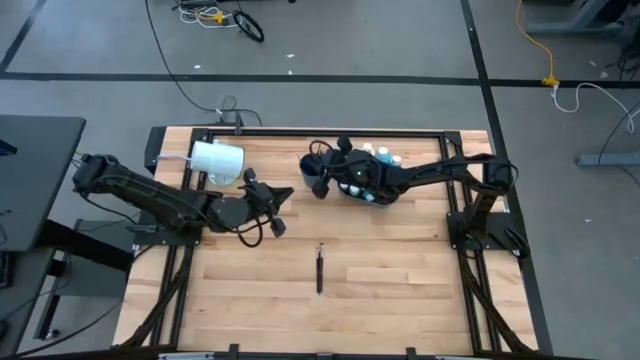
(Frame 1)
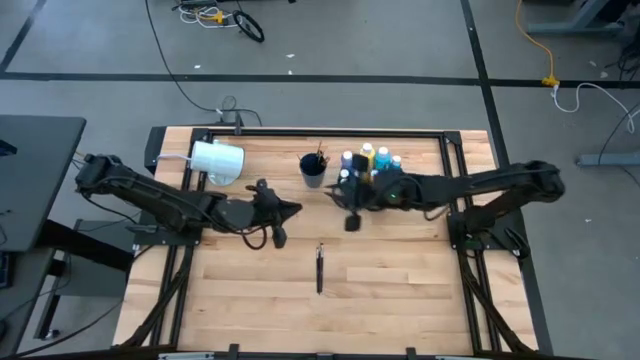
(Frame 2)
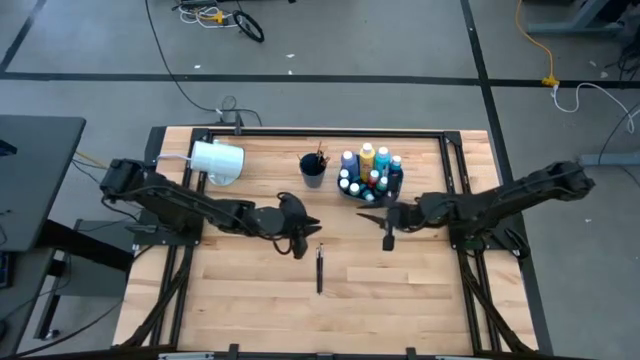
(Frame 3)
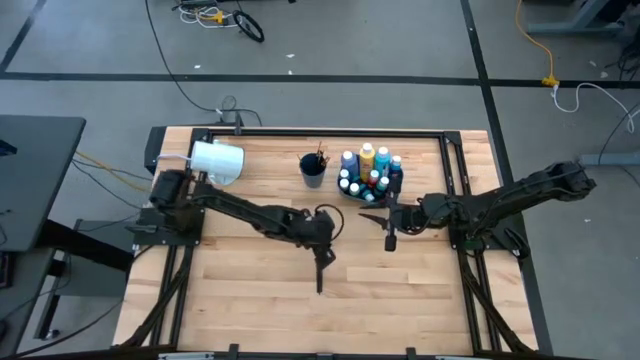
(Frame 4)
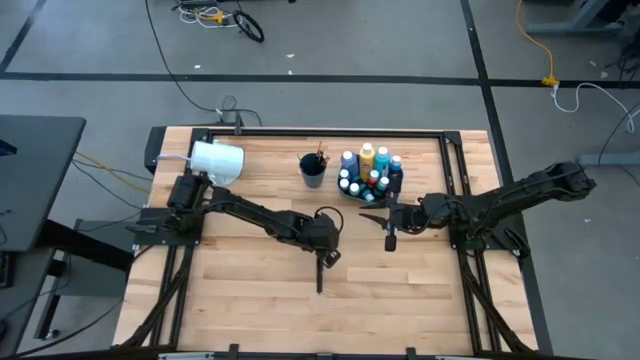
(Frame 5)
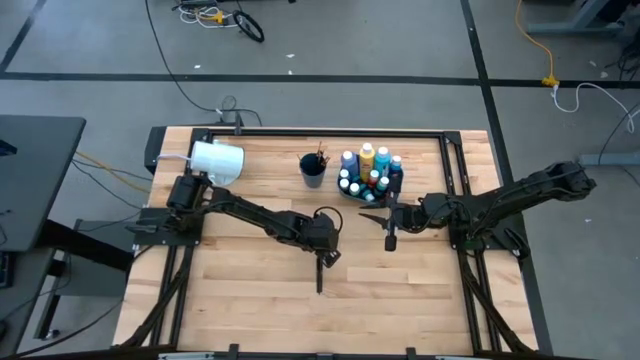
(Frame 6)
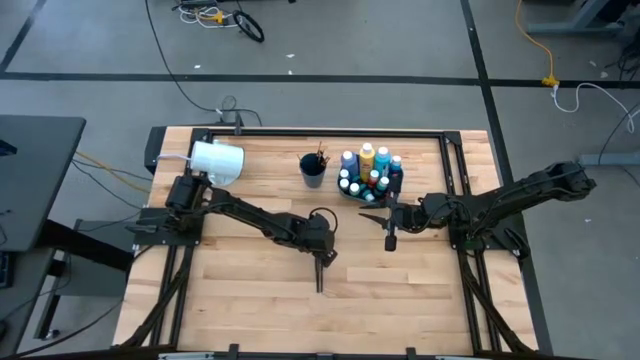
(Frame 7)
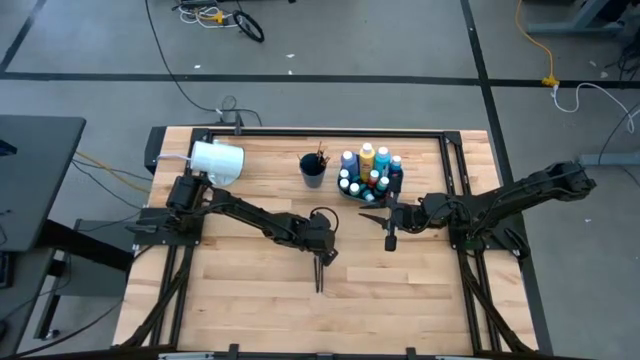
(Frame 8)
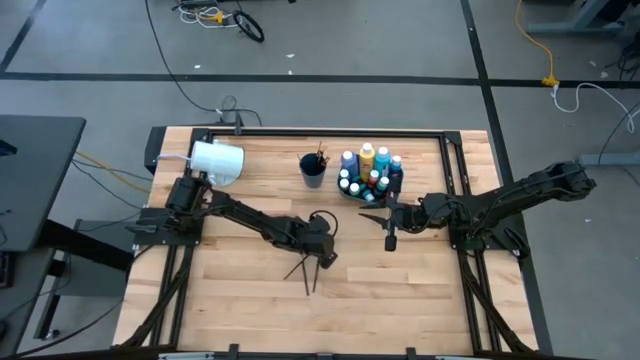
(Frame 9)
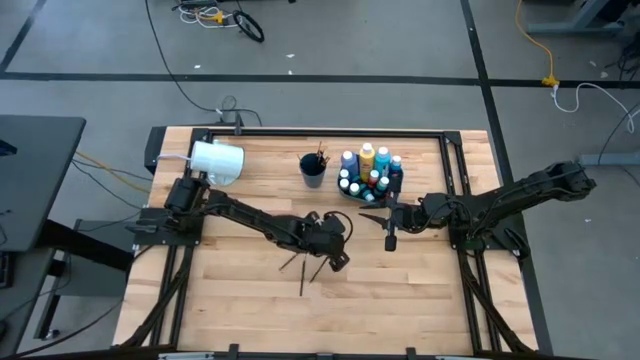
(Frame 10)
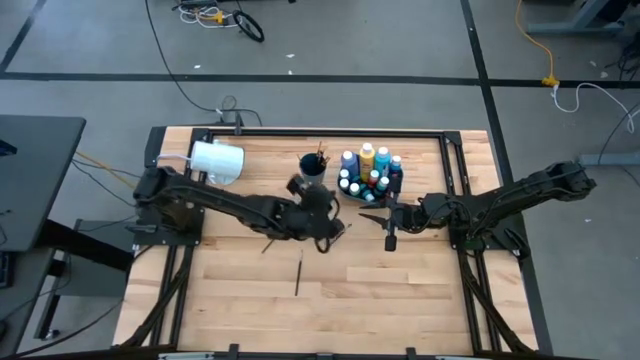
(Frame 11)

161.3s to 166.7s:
Task: Pick & Place Paint Supplies
Put the silver paint brush into the blue cup

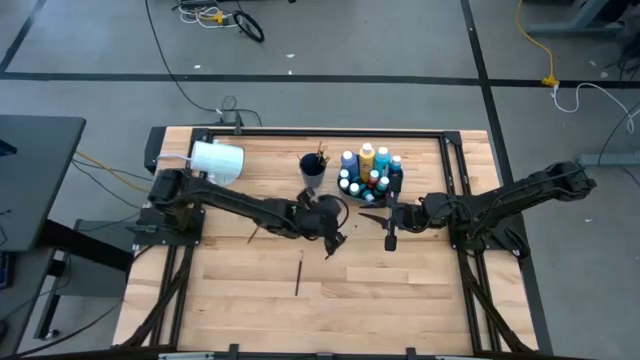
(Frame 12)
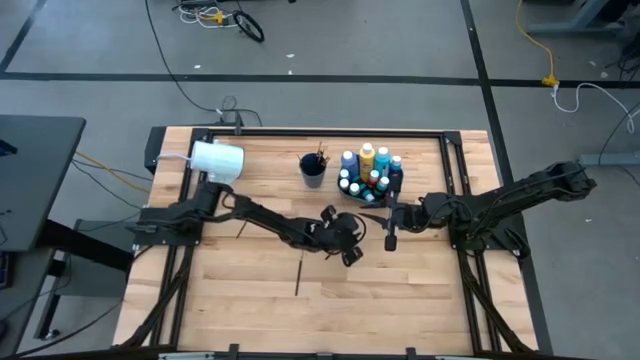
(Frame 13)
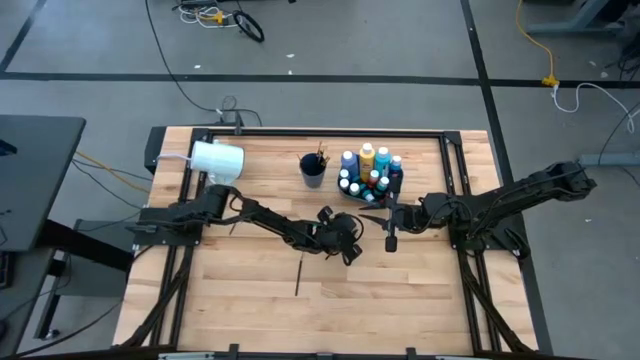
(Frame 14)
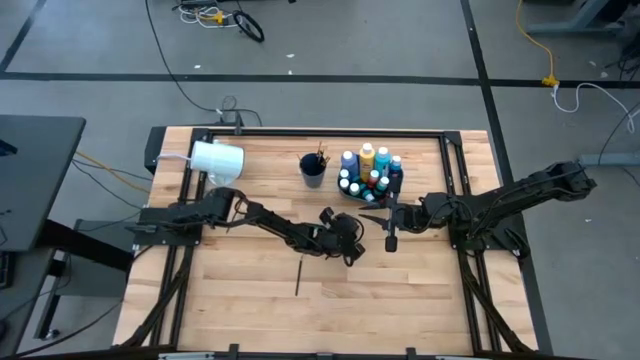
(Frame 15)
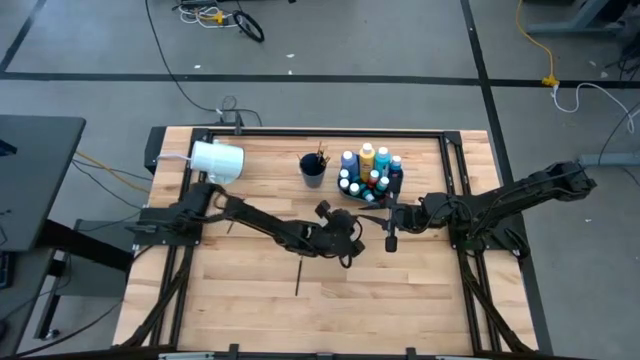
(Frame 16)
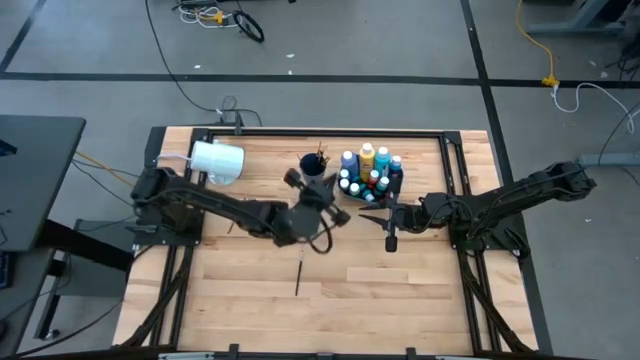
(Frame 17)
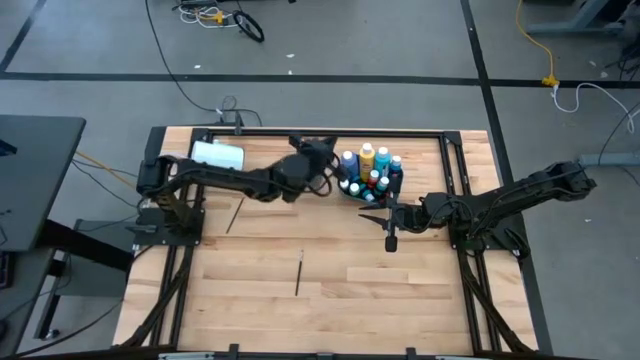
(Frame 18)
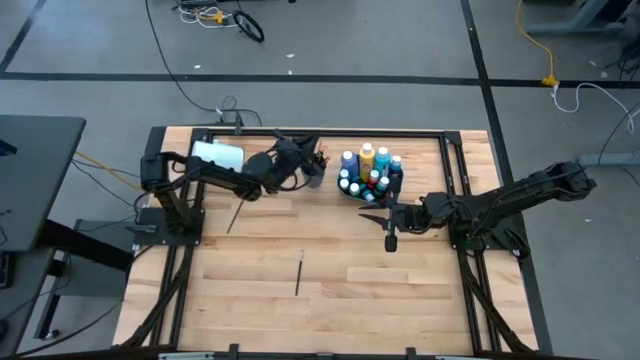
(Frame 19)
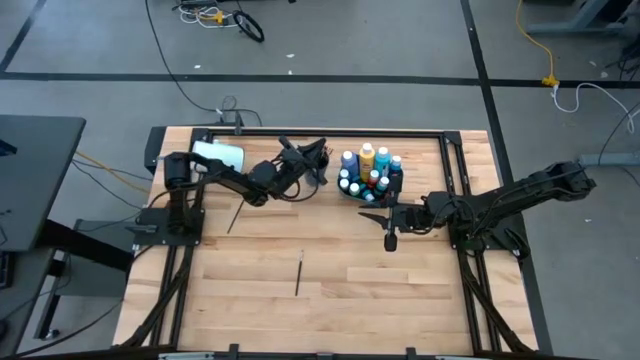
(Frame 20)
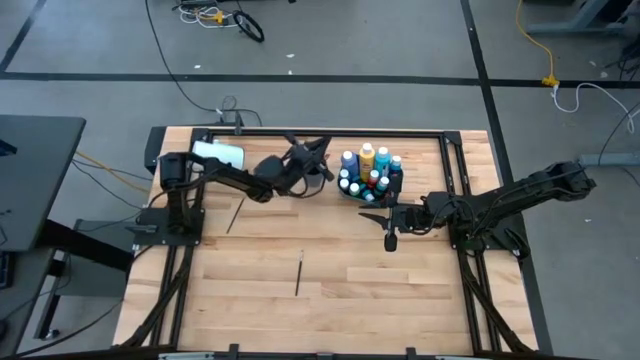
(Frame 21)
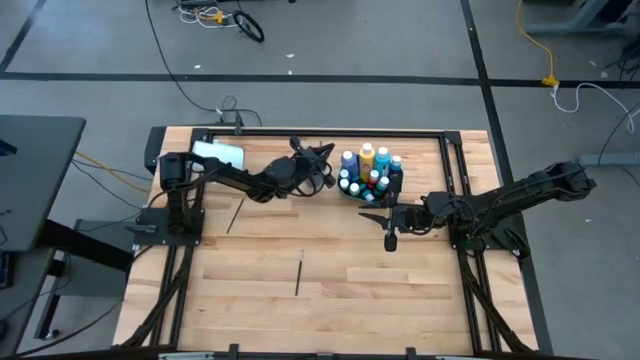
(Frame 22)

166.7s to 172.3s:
Put the silver paint brush into the blue cup

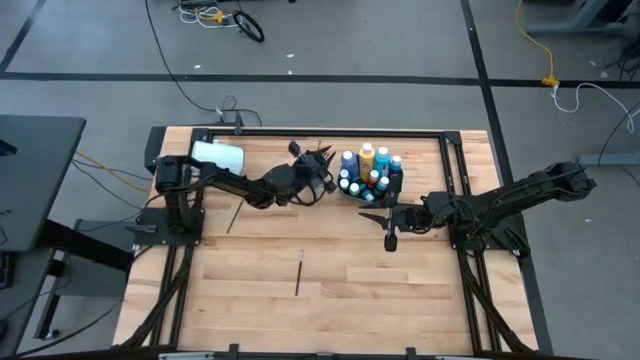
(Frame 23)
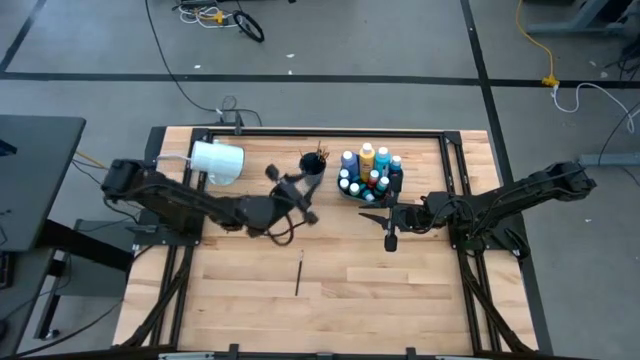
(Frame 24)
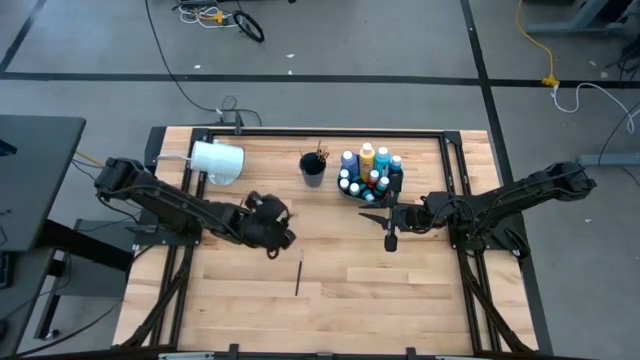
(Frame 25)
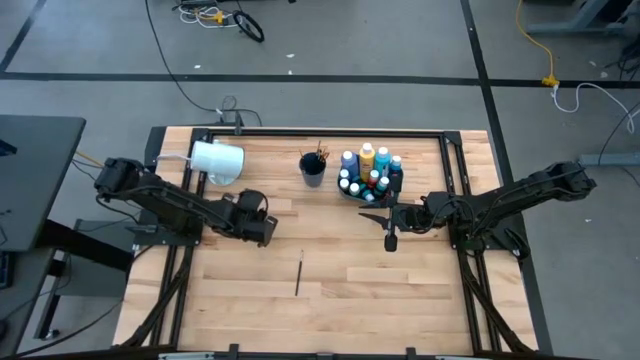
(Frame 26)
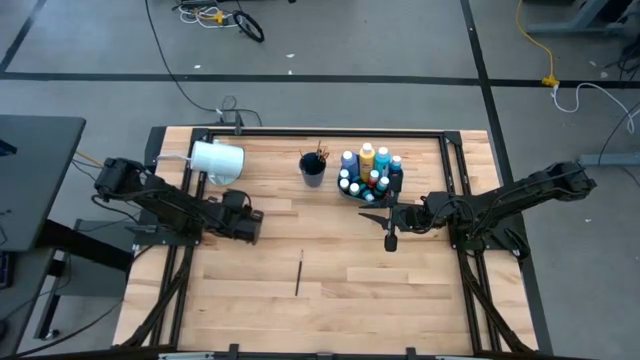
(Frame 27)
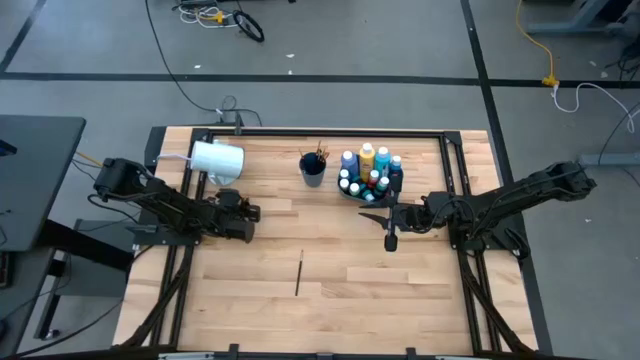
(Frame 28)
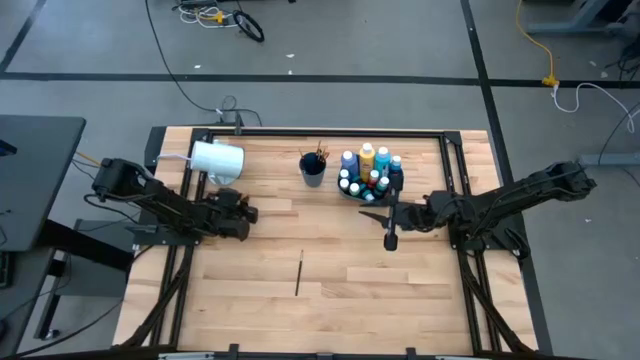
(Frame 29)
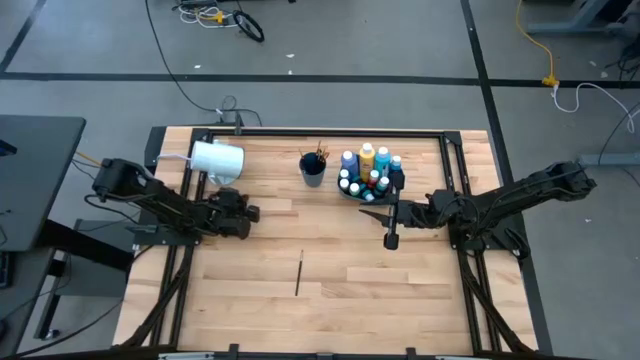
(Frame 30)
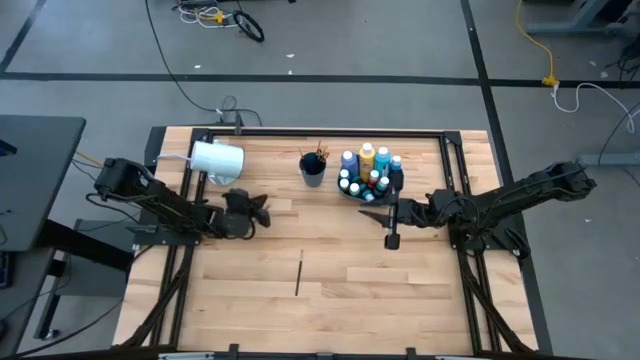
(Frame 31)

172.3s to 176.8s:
Put the gold paint brush into the blue cup

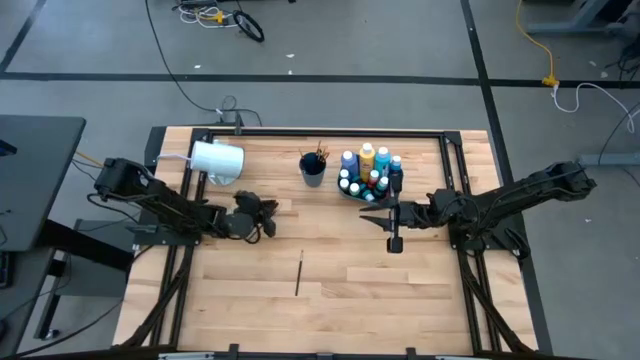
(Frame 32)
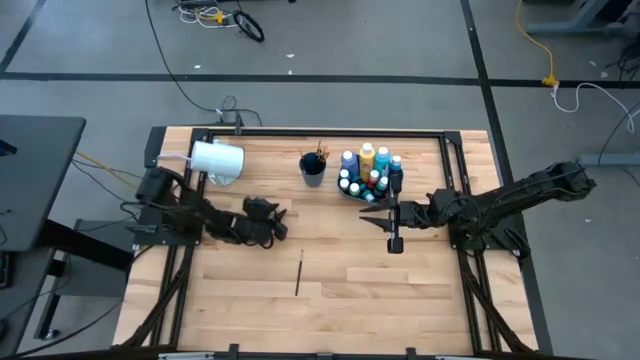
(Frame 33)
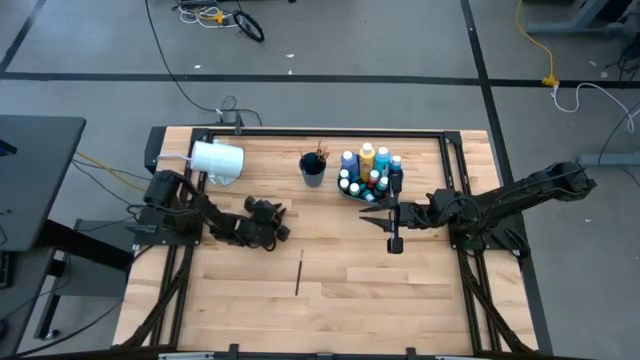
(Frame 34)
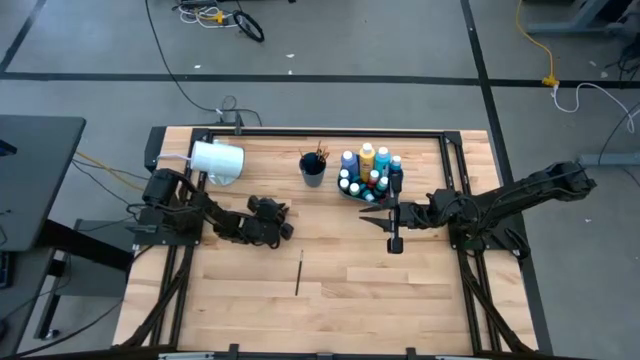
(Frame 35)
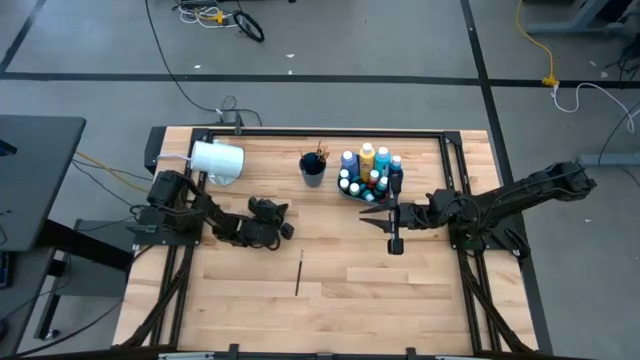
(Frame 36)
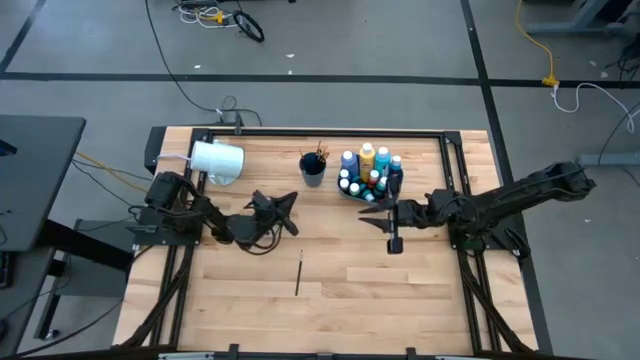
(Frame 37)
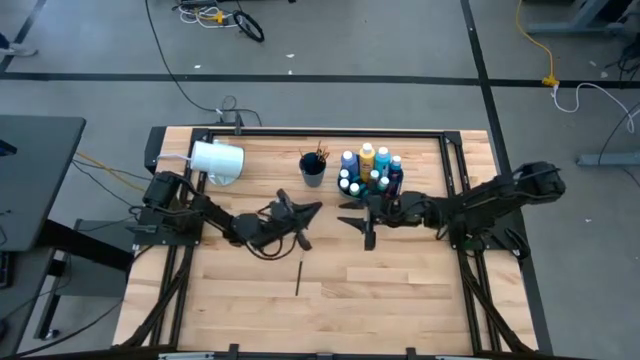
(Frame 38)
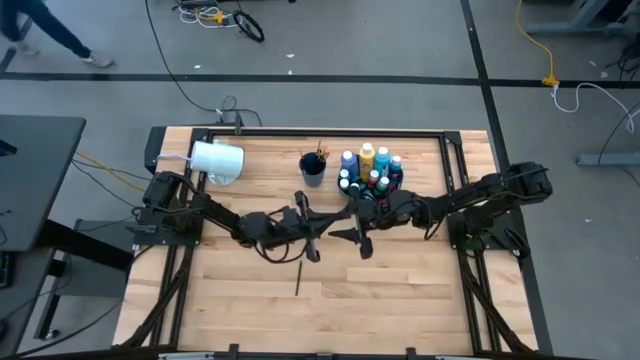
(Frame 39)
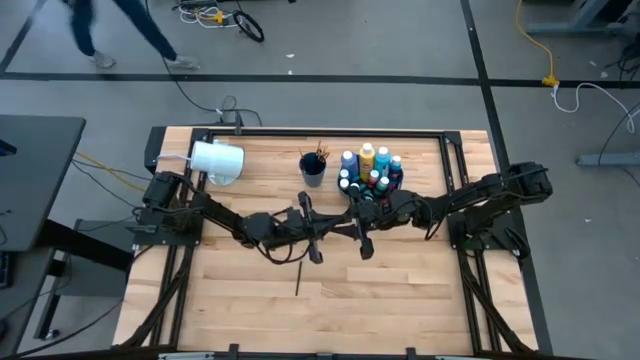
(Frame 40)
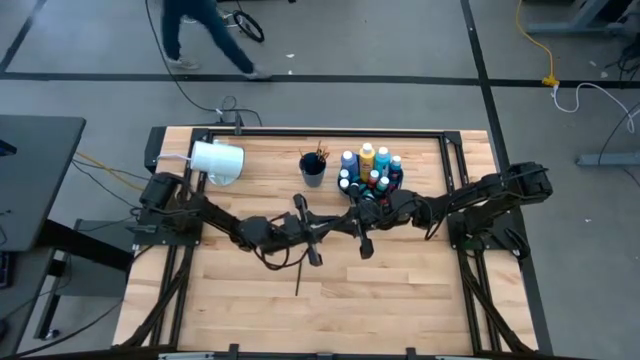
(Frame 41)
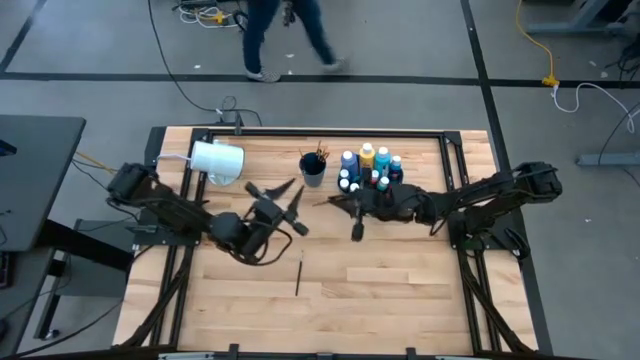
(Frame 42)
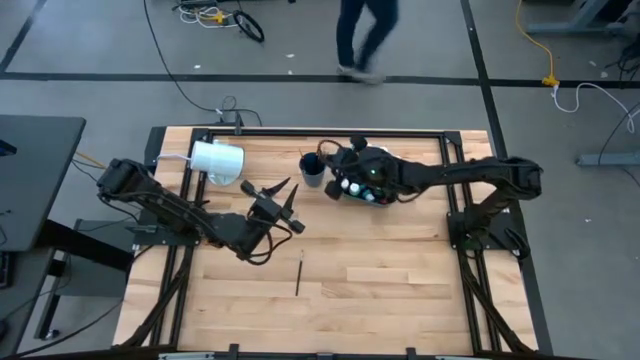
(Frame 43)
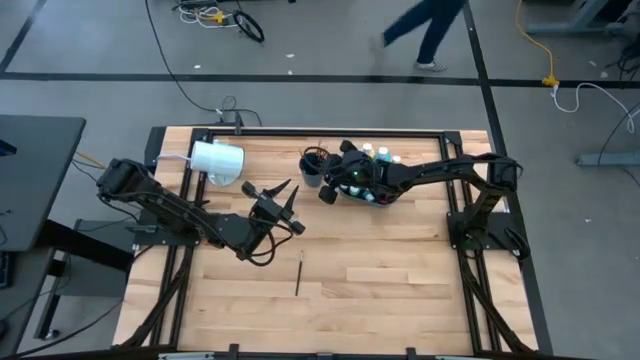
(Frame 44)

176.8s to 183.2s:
Put the gold paint brush into the blue cup
